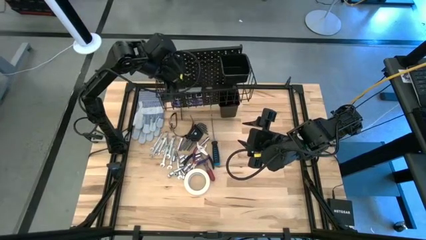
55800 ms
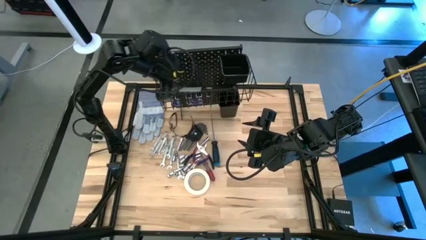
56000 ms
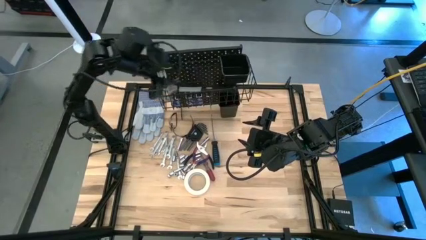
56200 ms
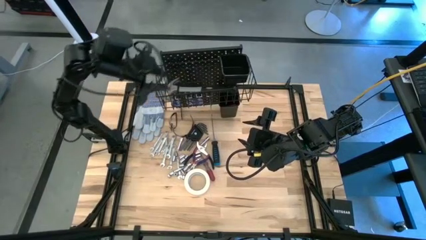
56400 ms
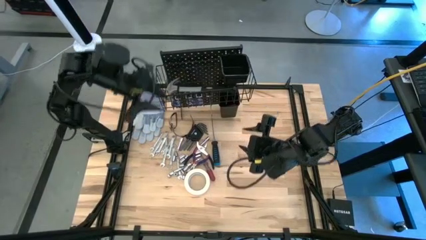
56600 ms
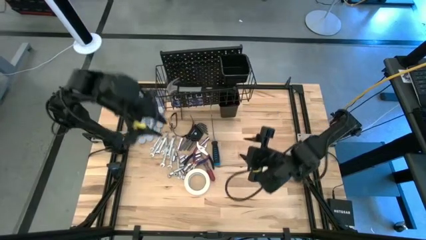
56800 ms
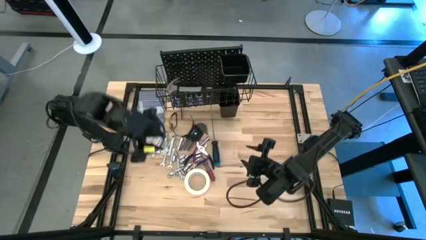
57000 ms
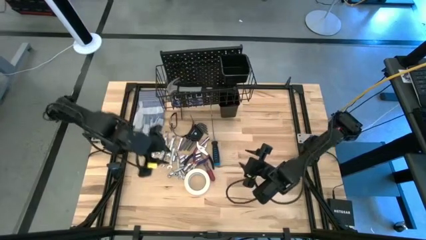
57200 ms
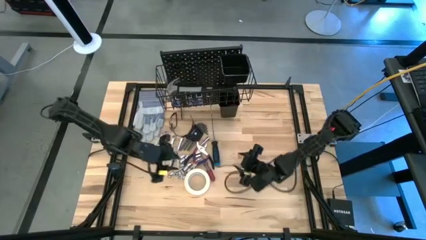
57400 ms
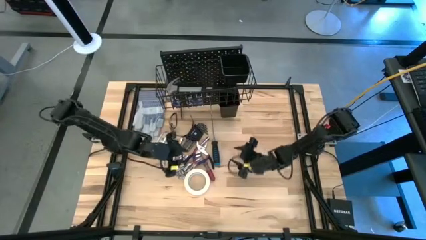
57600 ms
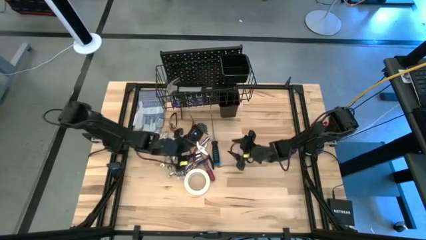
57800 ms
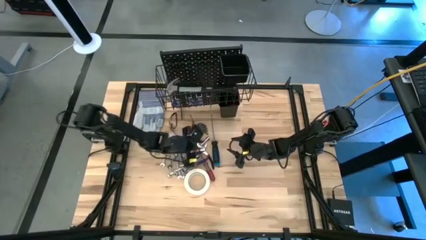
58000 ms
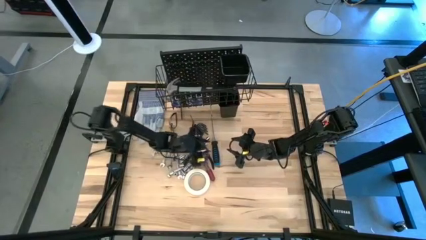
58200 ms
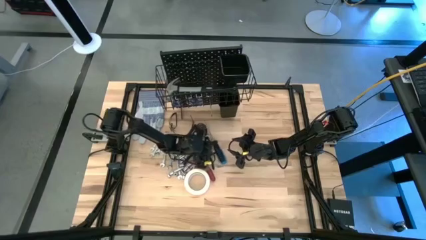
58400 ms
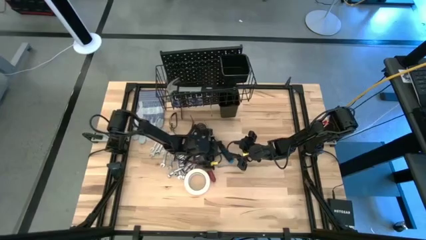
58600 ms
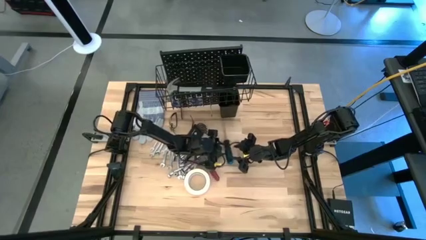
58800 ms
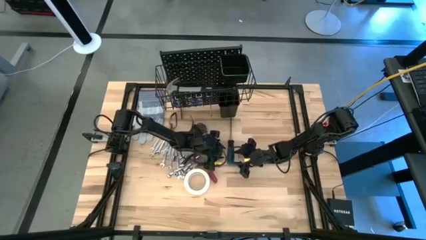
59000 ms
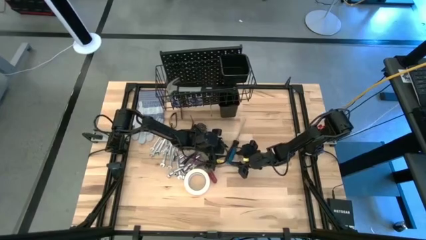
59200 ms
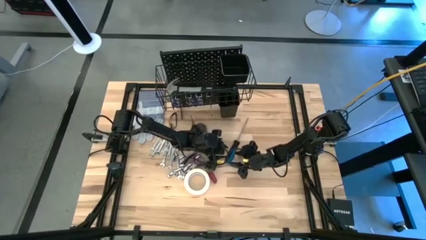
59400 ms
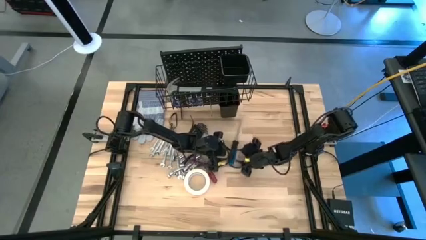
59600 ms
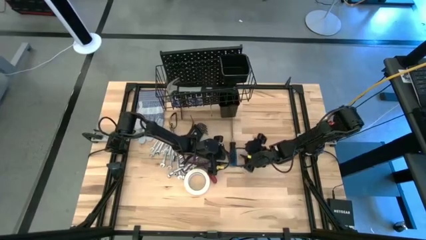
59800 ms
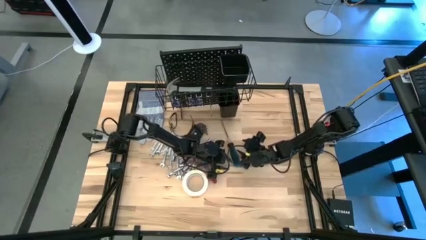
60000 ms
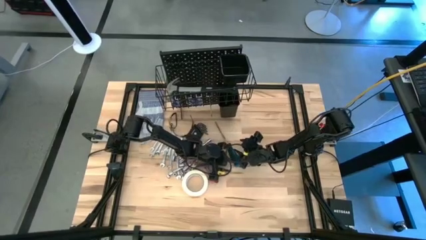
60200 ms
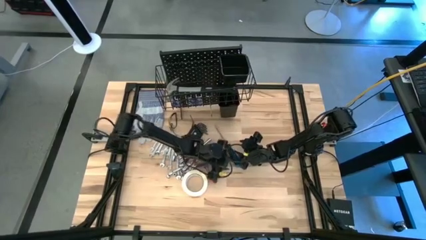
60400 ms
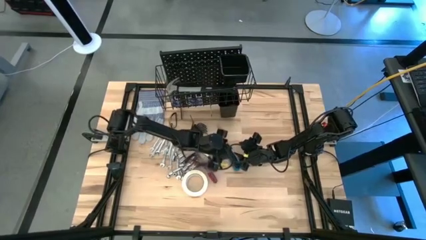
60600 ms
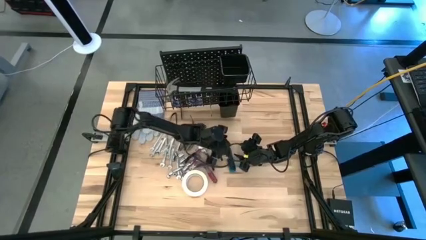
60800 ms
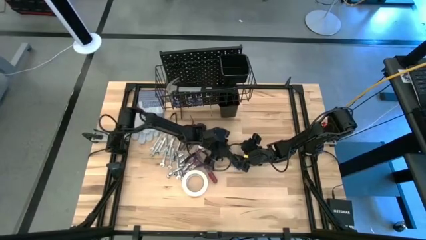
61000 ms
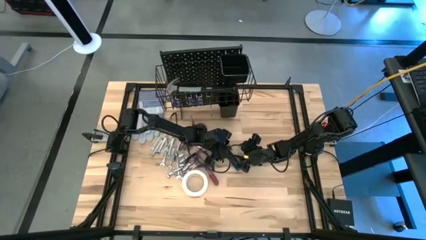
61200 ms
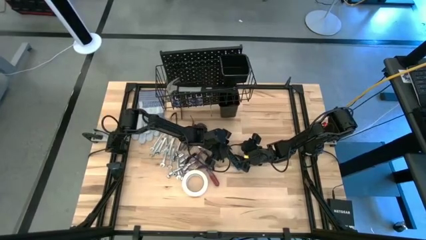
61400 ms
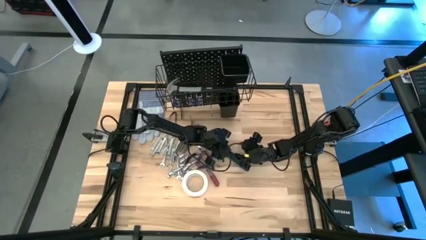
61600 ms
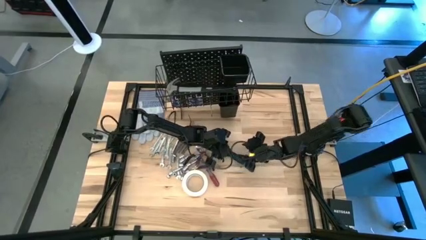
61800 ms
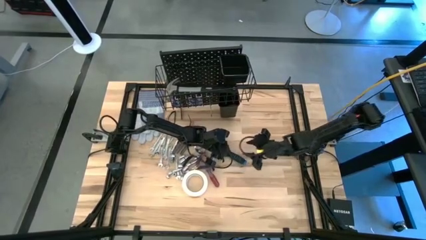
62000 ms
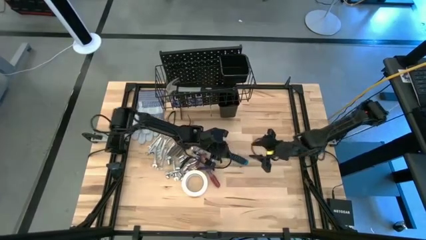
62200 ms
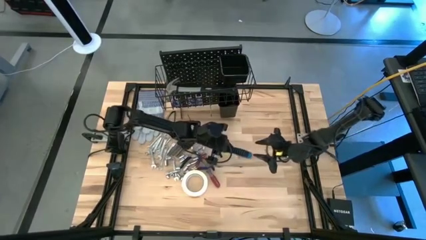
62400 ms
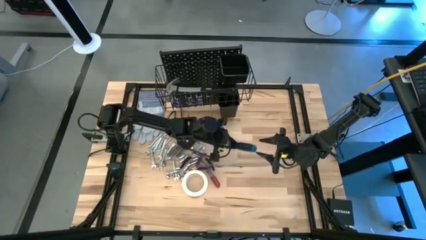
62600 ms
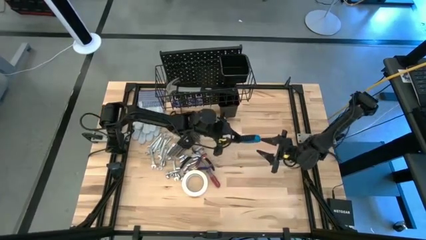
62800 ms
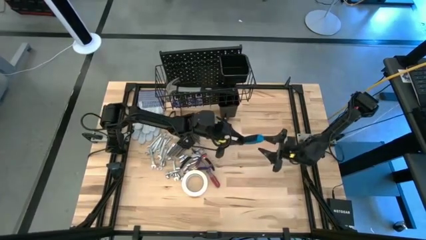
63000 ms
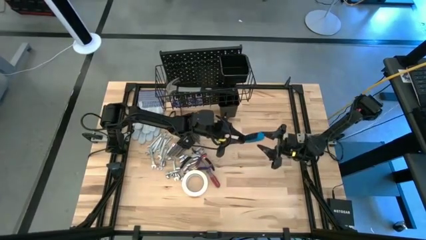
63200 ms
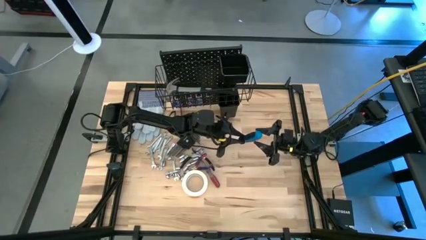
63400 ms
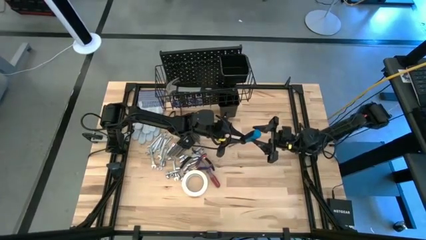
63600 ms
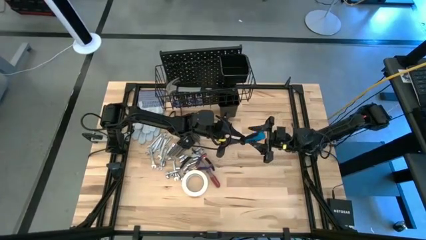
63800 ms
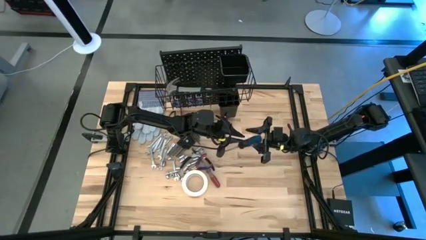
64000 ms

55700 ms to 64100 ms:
Task: Hang tools onto peg board
Put the black screwdriver into the bottom black bin on the pegboard

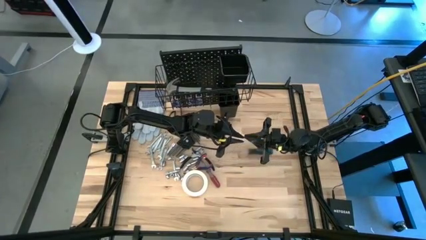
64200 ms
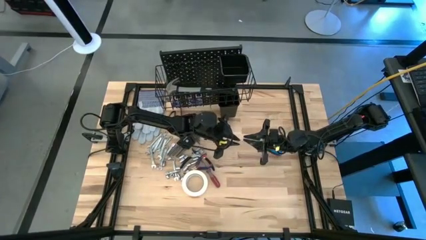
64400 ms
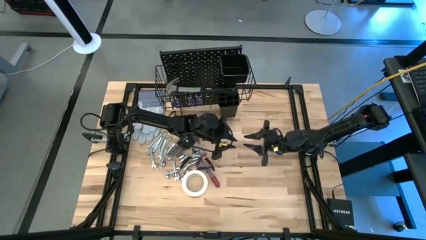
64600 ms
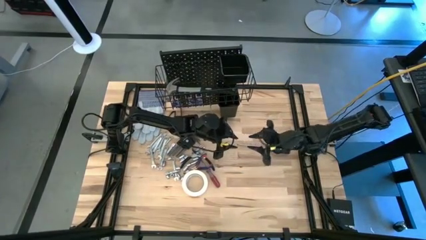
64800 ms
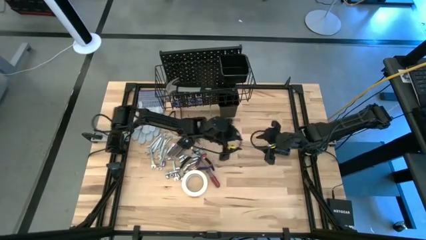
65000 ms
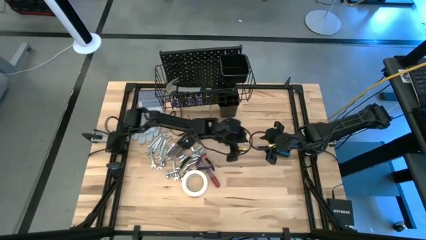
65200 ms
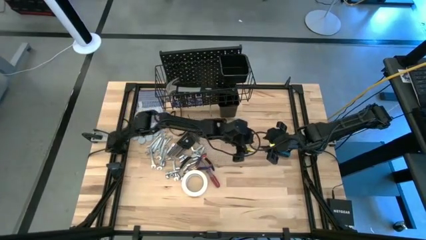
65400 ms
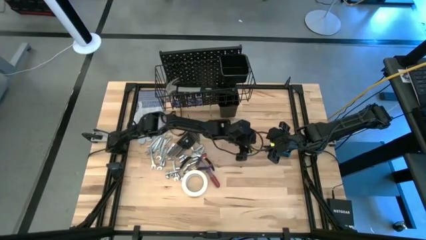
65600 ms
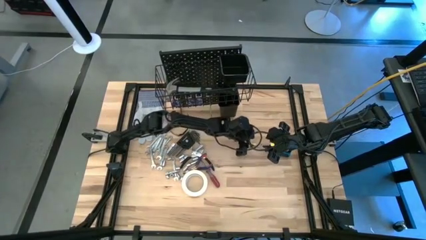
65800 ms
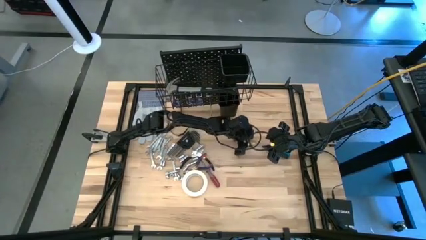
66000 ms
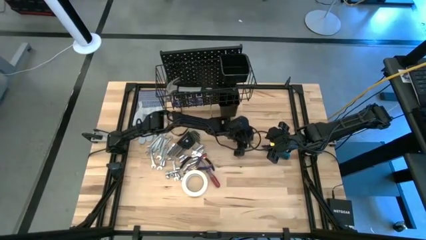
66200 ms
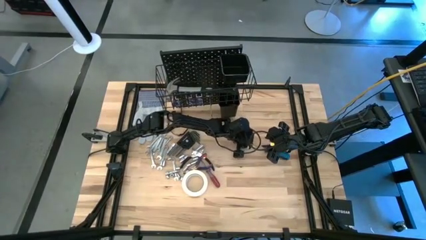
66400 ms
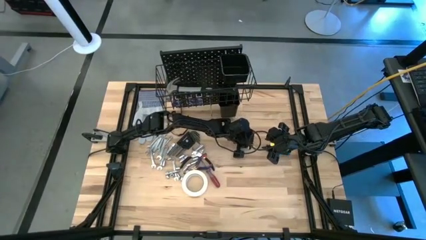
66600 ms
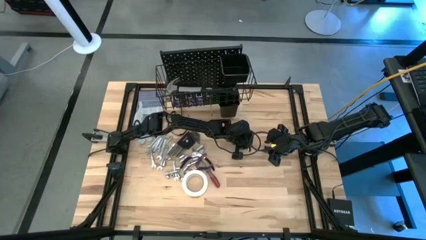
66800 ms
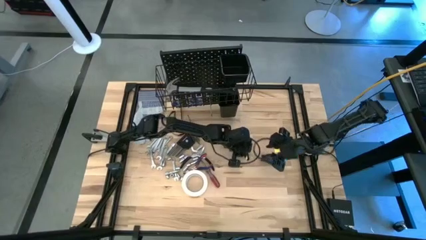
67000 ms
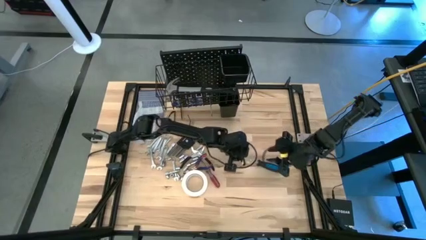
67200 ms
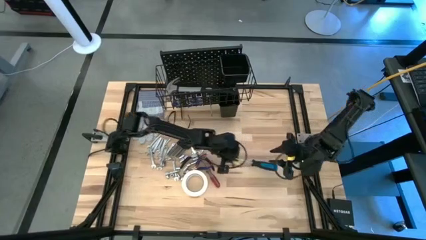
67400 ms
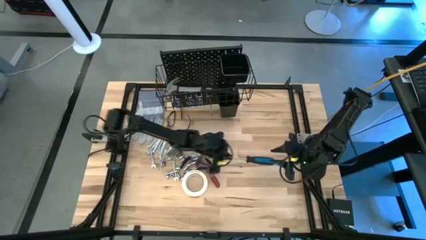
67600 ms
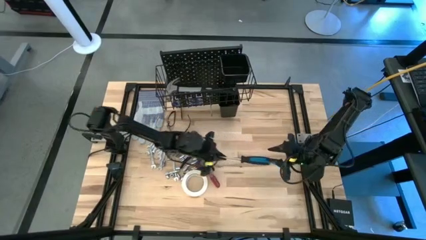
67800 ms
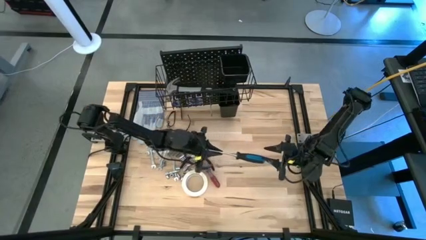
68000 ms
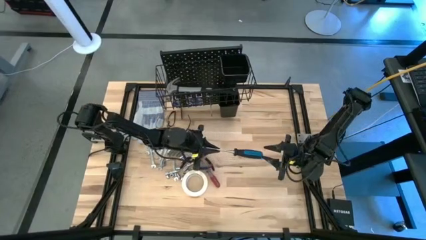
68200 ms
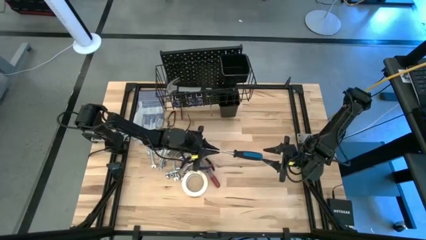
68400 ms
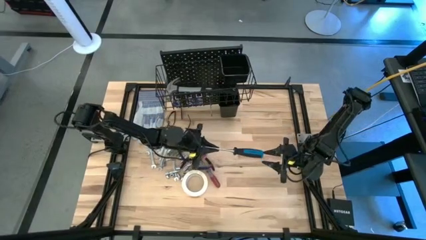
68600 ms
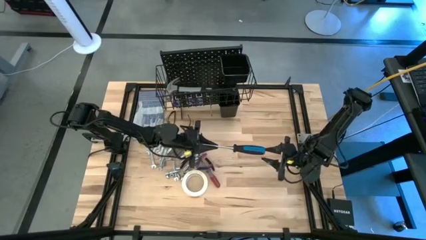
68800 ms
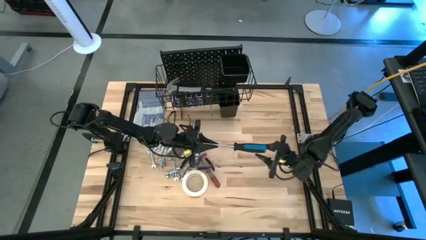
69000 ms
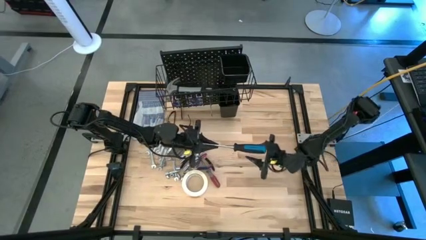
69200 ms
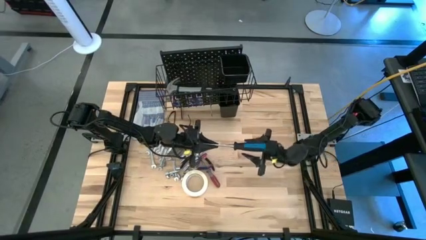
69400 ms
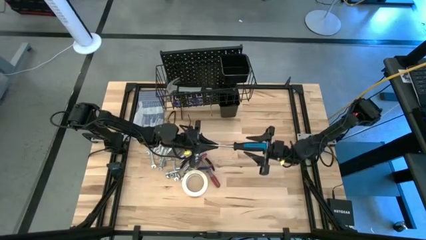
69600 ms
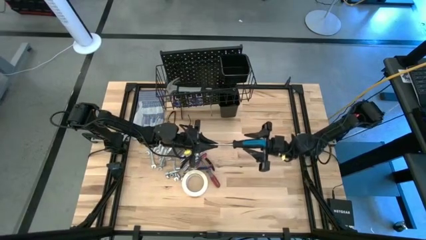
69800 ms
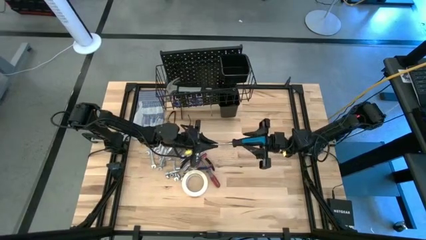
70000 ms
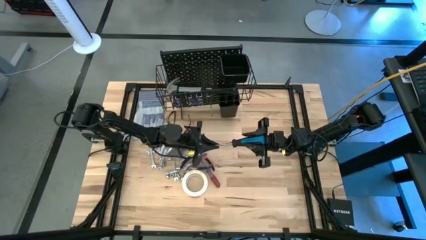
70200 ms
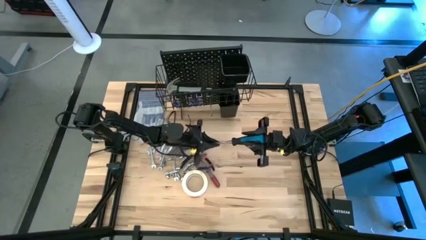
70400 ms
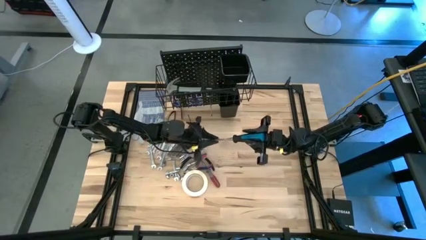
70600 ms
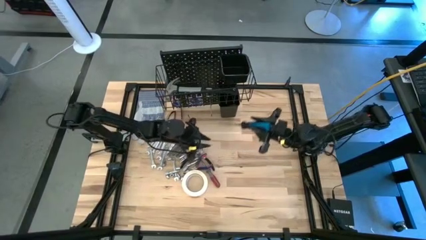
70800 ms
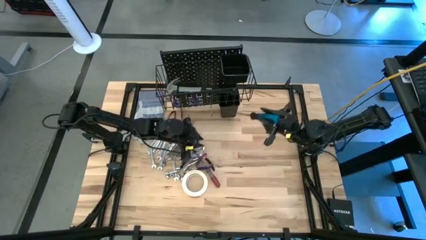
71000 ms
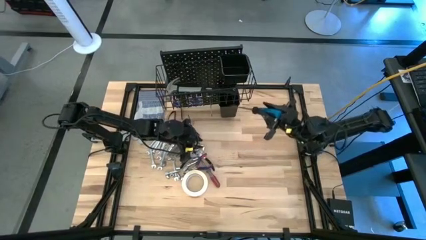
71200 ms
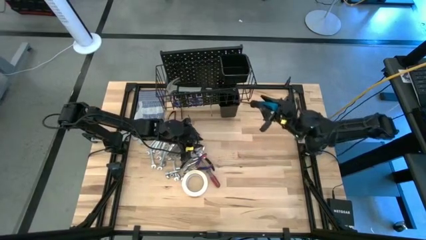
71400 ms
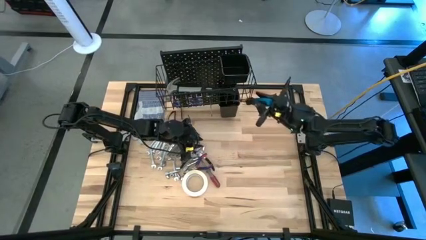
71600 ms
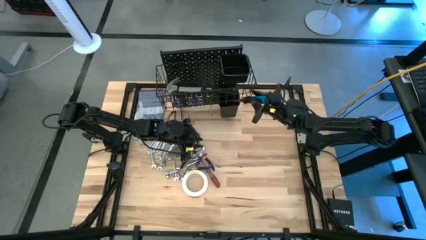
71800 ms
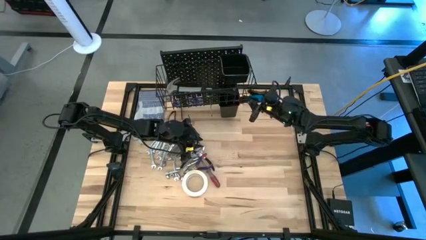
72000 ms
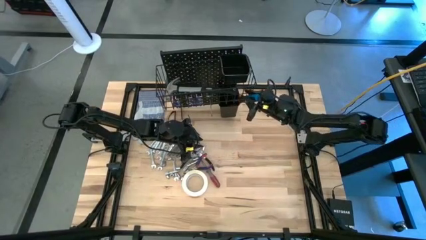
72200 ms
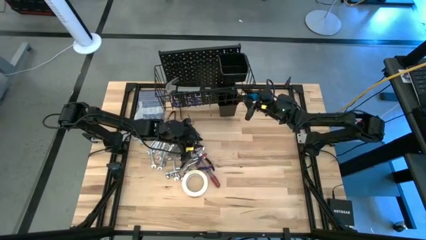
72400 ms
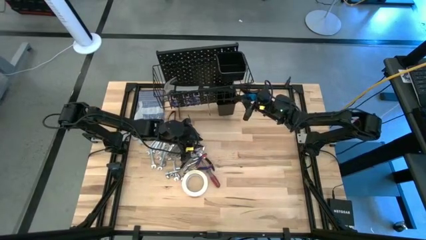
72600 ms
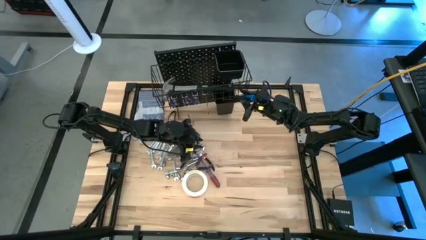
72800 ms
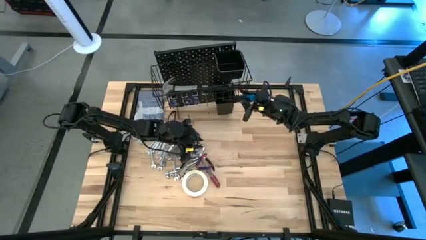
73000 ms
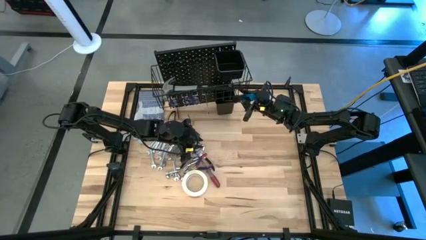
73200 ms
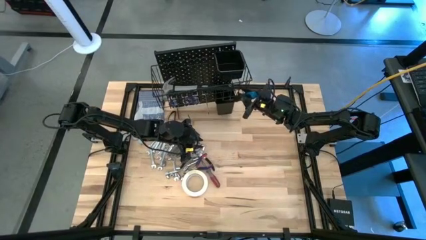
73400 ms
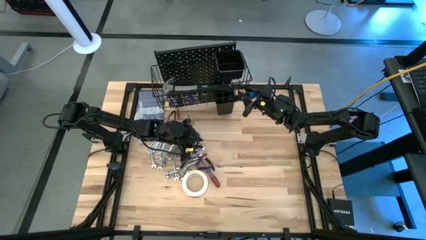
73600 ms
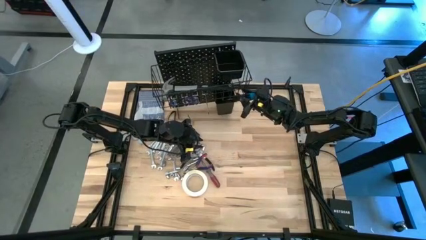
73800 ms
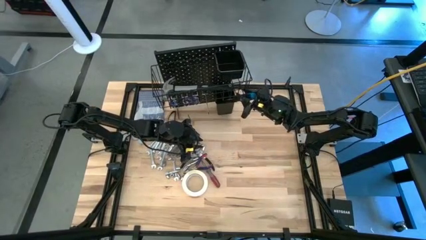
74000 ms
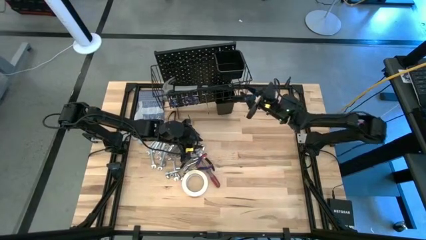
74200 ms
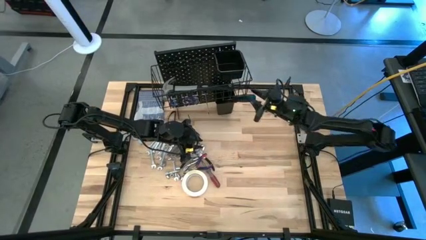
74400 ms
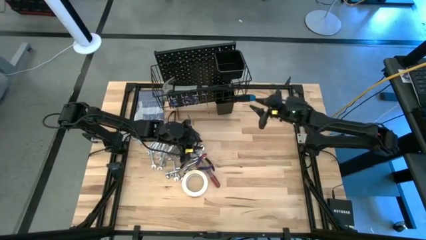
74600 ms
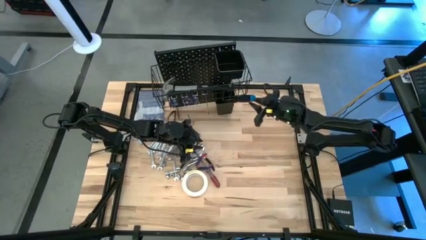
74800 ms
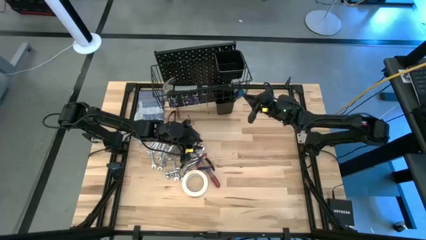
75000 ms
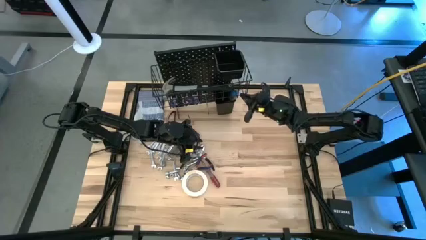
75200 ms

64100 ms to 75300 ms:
Put the black screwdriver into the bottom black bin on the pegboard
